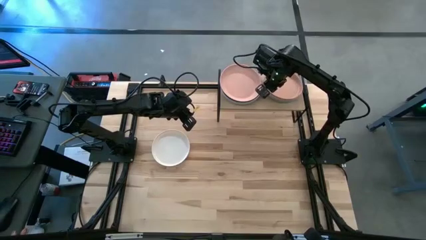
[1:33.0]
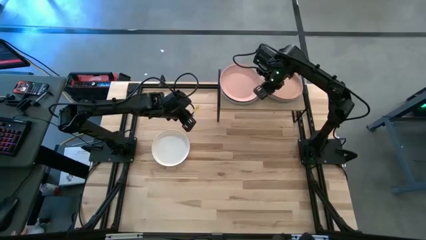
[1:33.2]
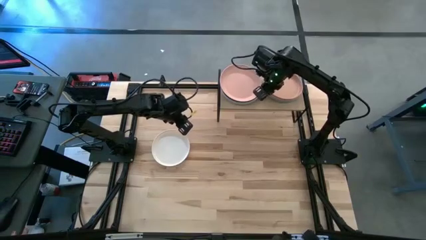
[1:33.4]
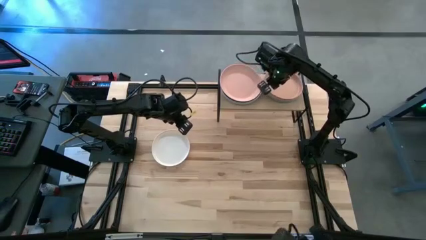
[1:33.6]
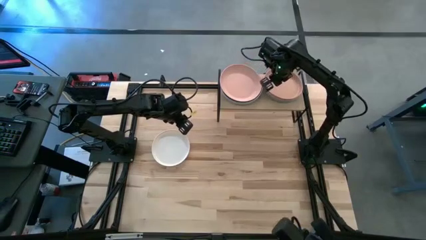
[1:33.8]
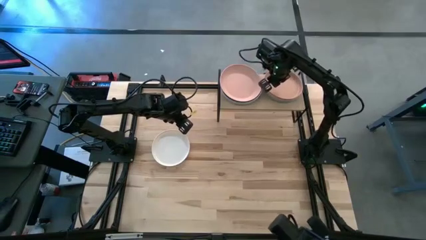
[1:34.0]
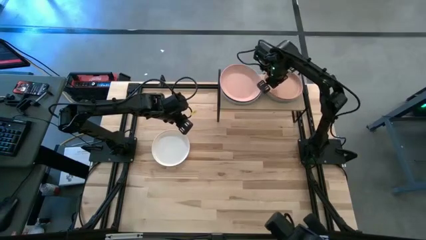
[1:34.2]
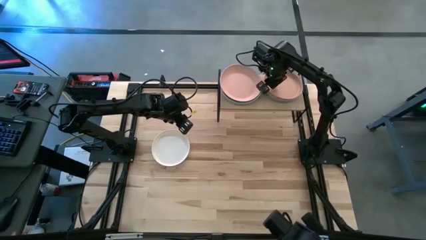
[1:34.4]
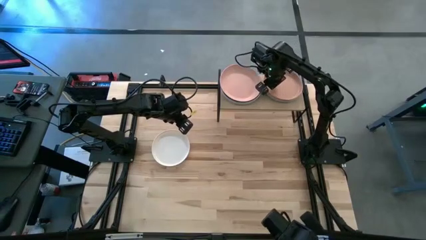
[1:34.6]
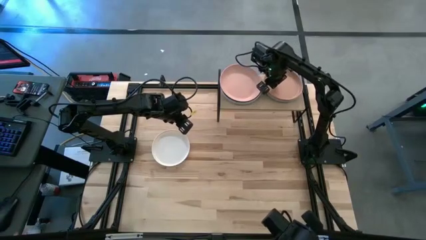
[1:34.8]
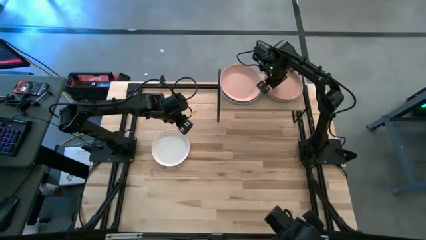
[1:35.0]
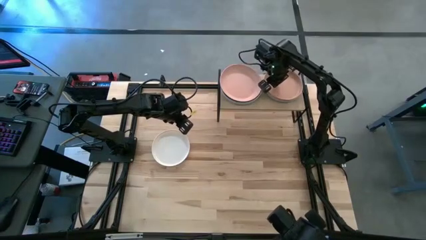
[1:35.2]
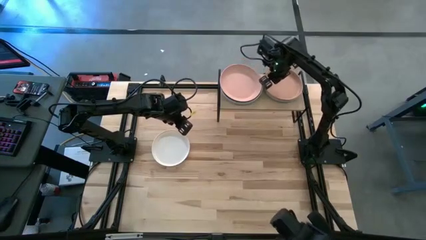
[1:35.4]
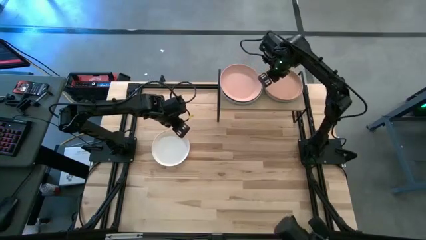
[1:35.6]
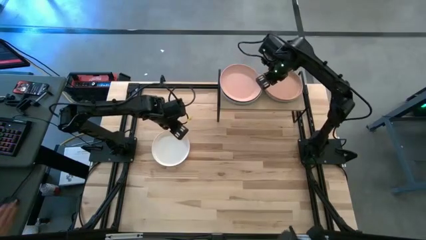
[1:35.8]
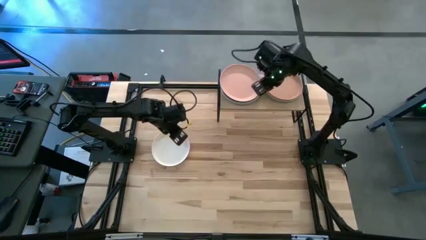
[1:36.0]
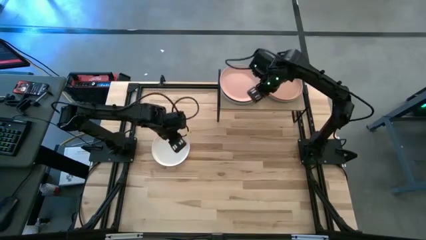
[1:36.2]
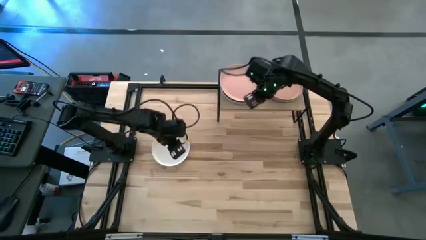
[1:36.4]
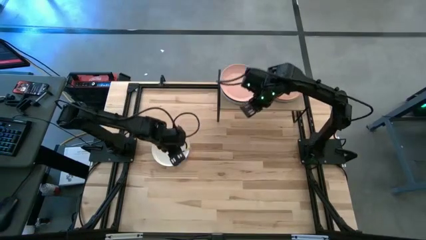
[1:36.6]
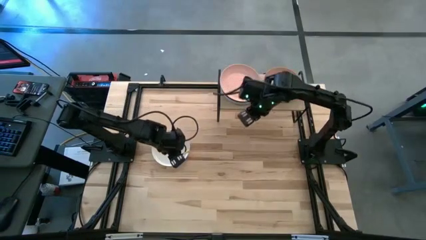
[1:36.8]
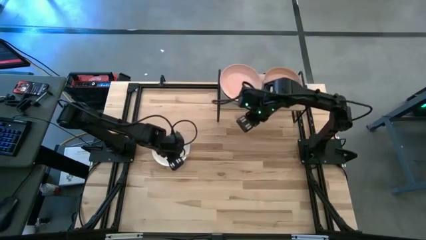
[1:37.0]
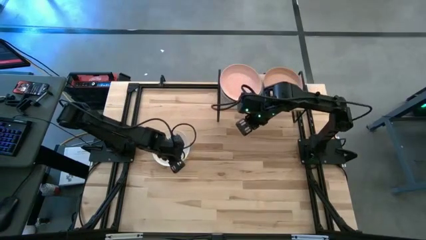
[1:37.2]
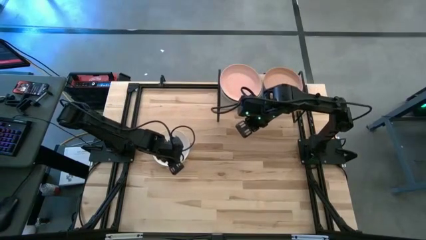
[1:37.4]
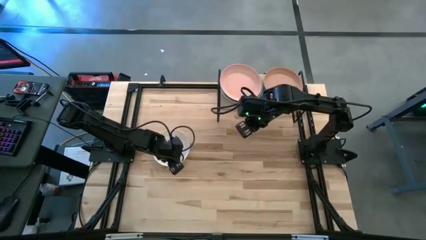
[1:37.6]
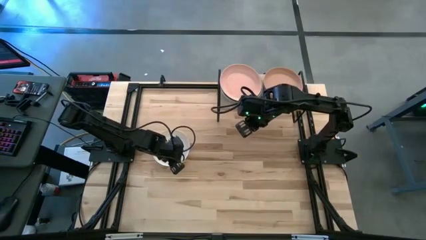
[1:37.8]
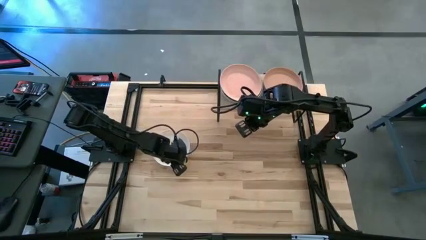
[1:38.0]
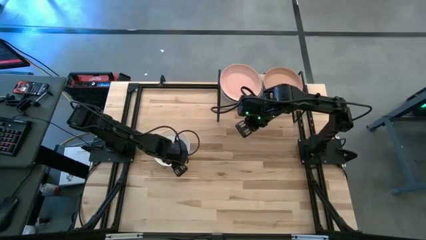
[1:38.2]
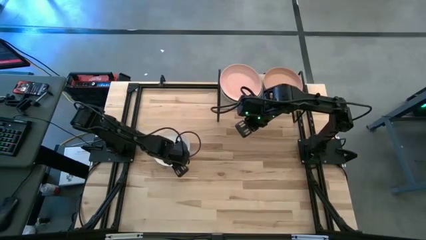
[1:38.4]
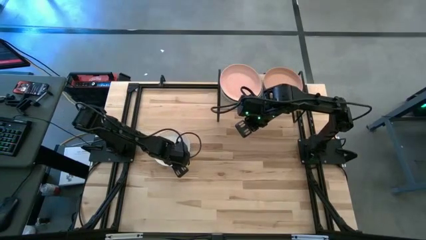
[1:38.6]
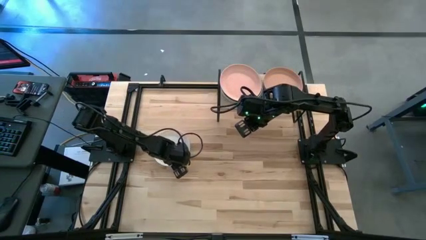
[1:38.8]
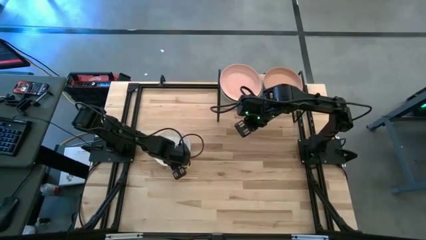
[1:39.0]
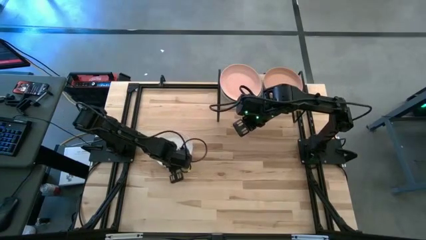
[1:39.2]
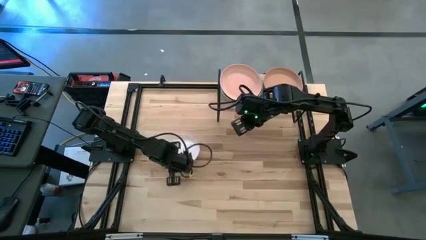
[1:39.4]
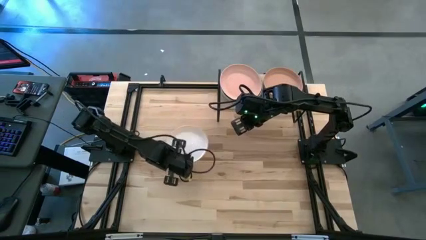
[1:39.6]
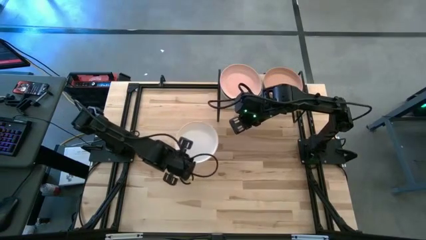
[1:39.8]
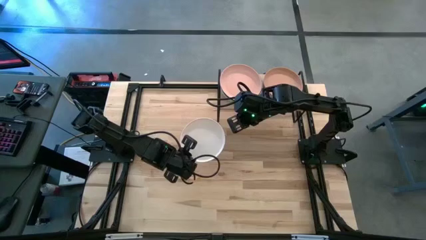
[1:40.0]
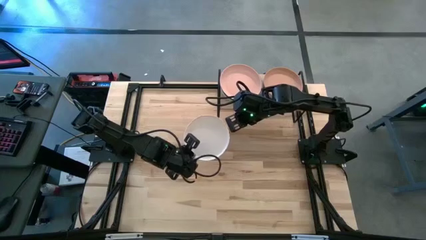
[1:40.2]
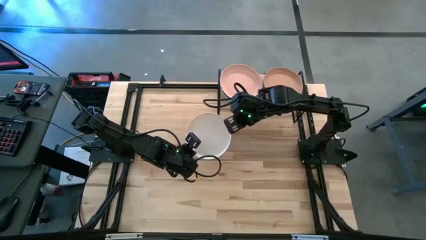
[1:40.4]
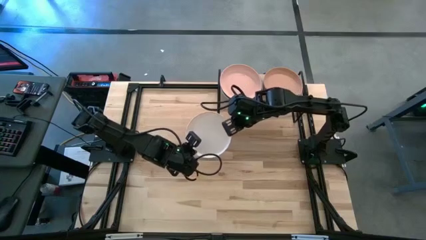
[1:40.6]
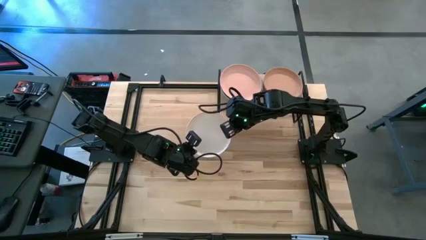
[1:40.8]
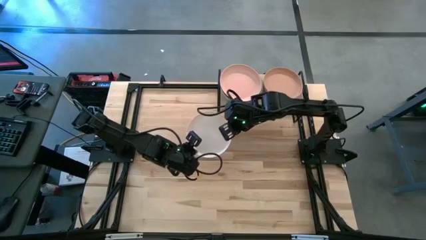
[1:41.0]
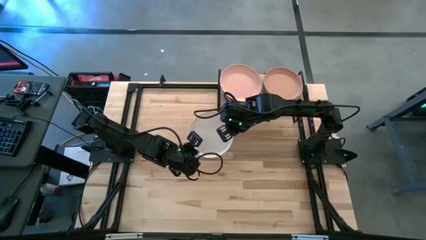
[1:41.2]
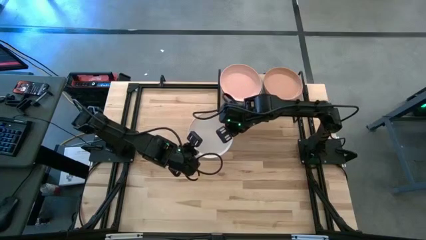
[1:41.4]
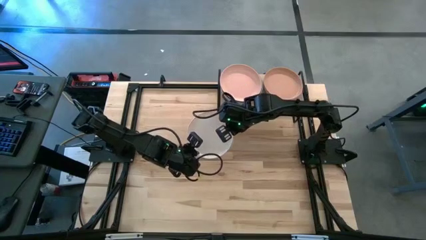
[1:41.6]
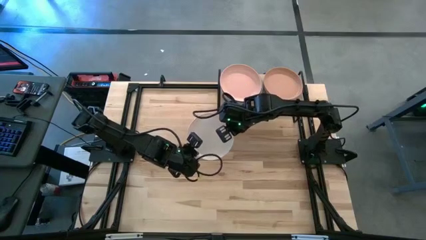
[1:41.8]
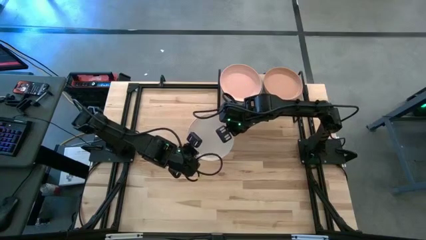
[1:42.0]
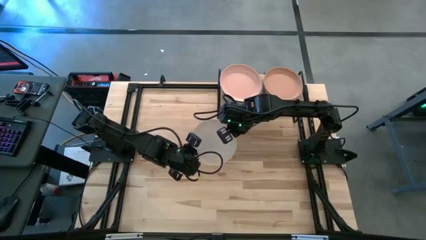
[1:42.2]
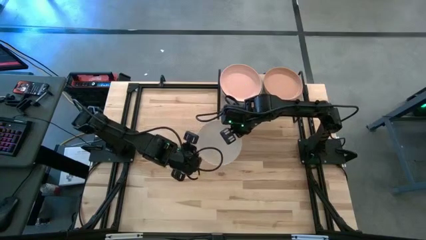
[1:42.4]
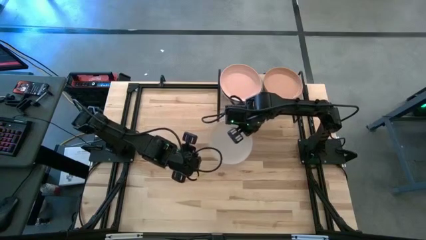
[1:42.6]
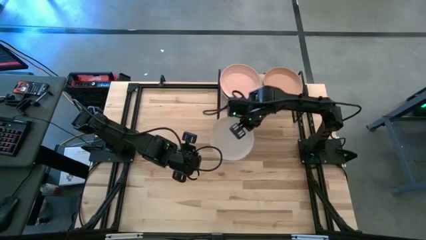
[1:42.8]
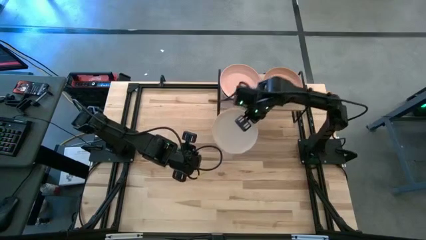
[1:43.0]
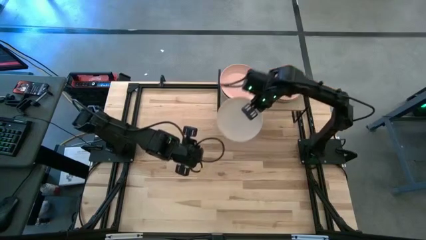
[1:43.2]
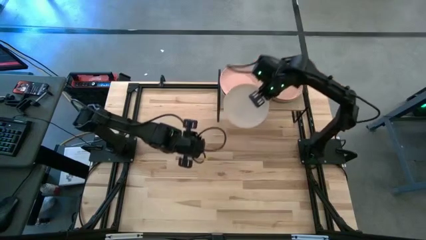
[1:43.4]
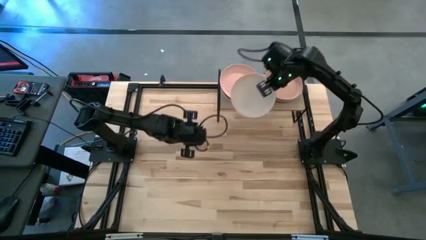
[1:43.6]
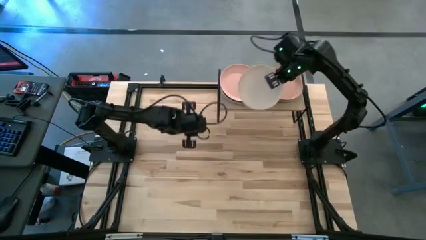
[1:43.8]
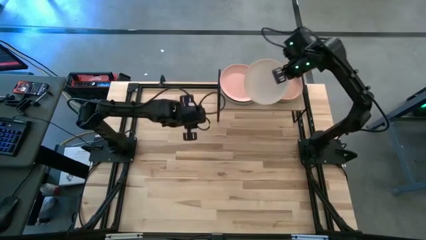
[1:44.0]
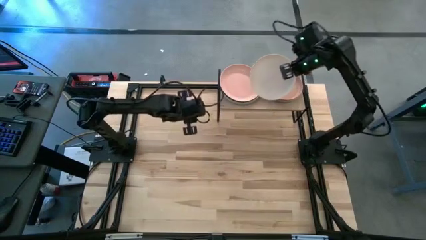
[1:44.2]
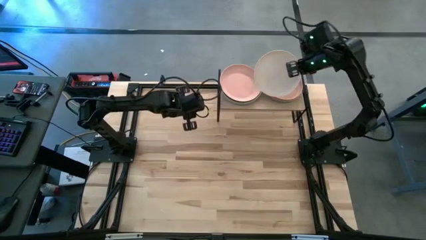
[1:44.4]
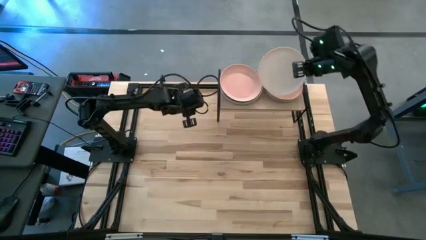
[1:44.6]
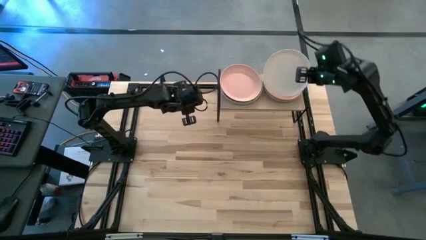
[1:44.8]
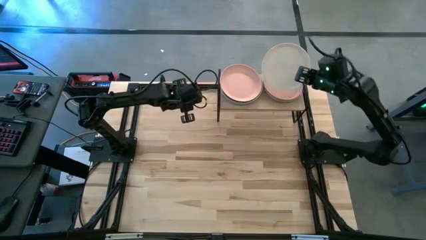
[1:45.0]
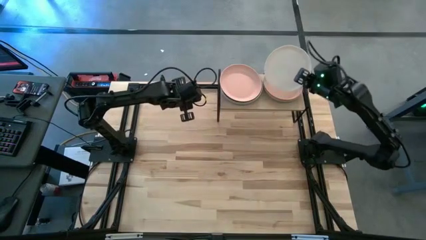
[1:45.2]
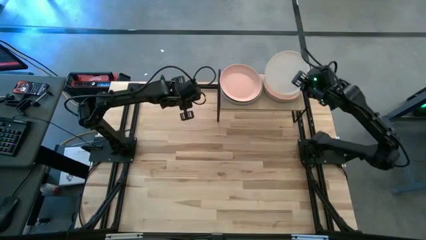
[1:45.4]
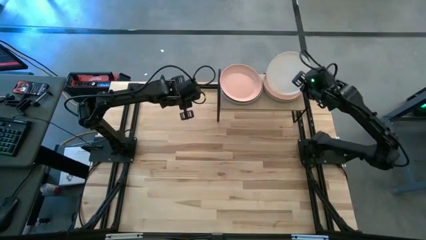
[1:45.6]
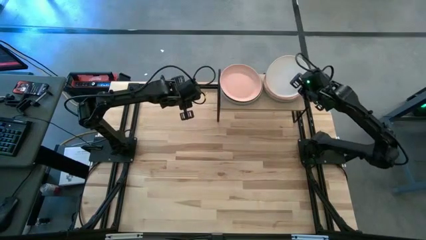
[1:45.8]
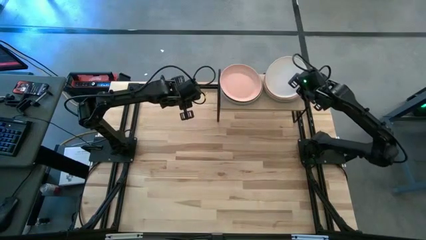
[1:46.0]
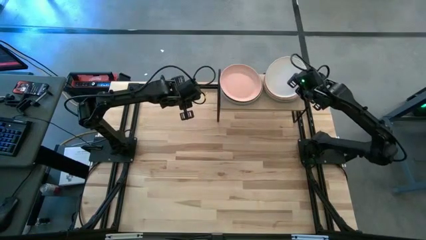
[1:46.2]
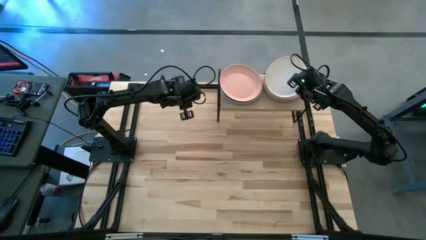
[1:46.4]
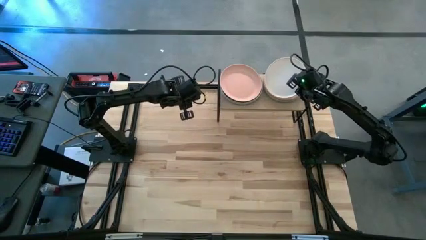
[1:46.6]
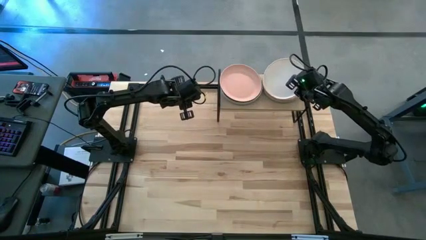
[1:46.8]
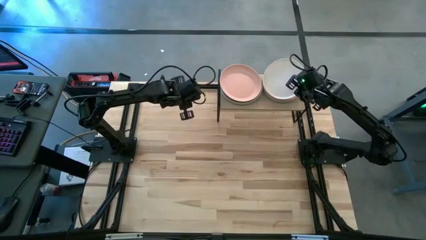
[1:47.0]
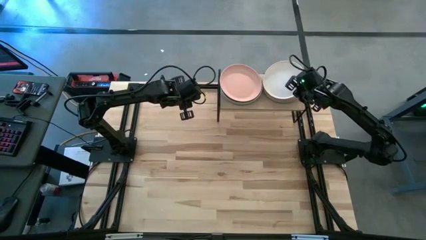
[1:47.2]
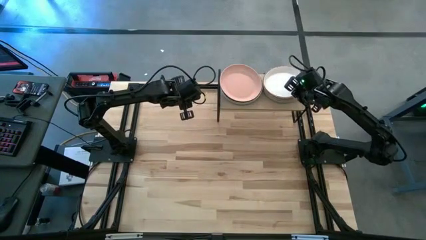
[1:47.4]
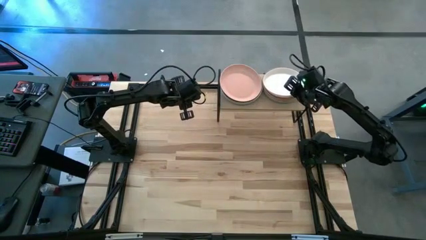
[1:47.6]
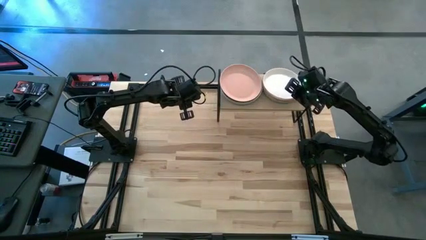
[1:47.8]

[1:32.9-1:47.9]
Task: Place and stack plates onto a shelf
Stack the white plate on top of the brown plate on the shelf

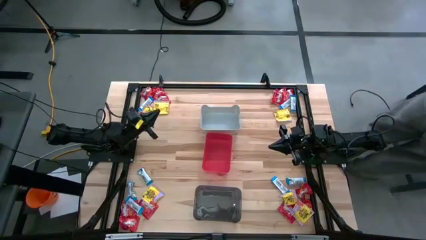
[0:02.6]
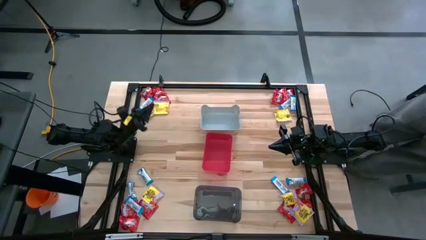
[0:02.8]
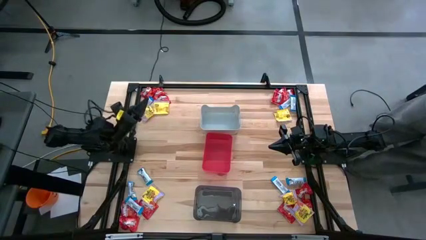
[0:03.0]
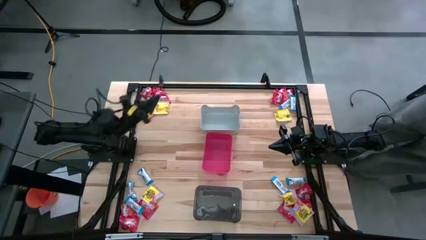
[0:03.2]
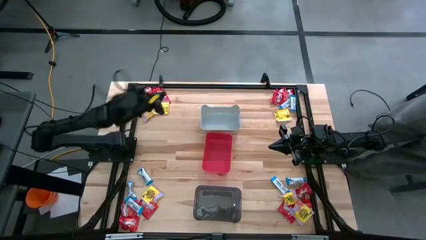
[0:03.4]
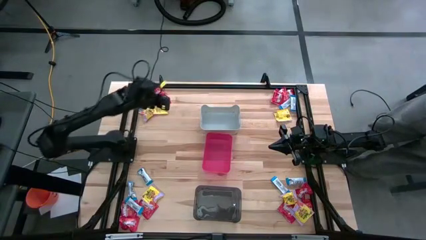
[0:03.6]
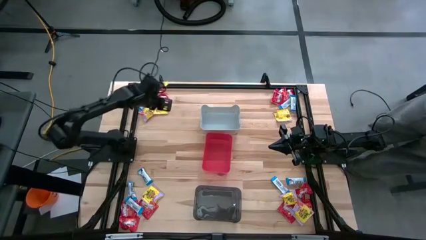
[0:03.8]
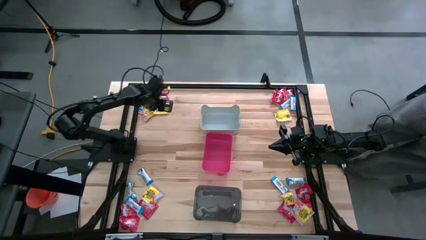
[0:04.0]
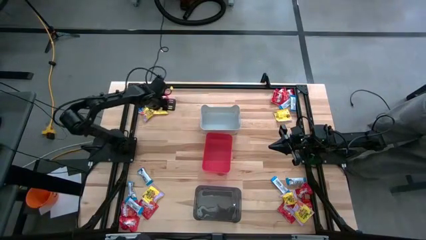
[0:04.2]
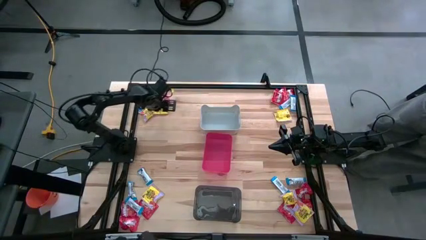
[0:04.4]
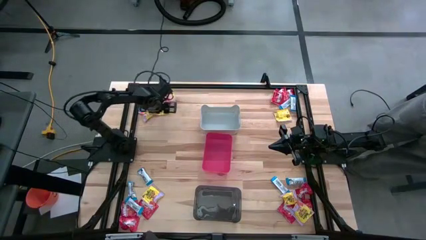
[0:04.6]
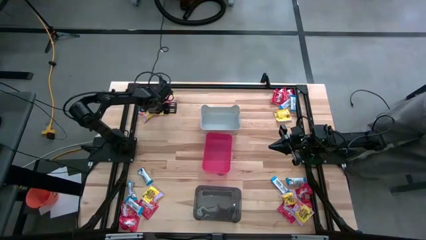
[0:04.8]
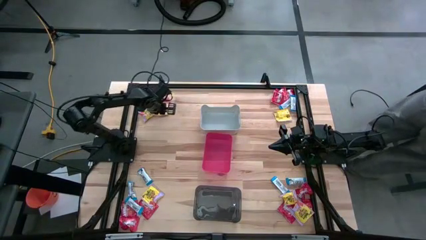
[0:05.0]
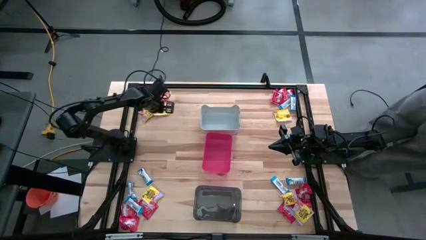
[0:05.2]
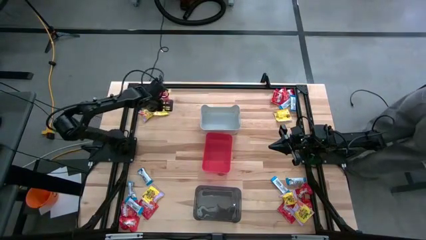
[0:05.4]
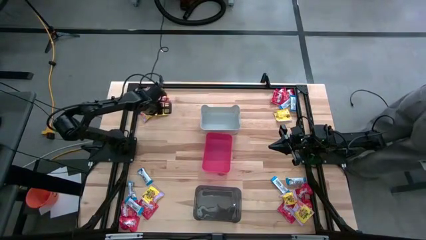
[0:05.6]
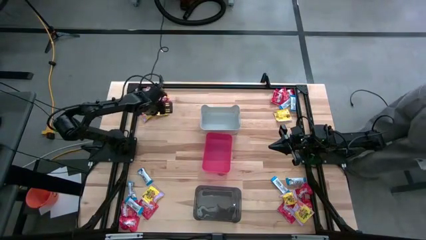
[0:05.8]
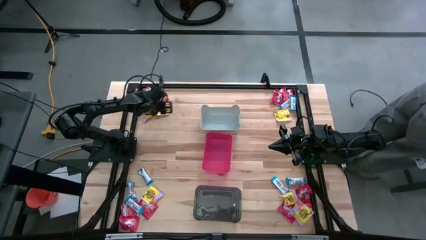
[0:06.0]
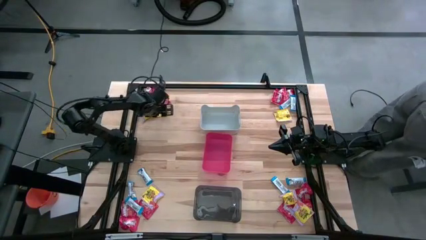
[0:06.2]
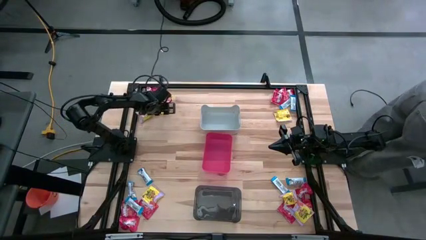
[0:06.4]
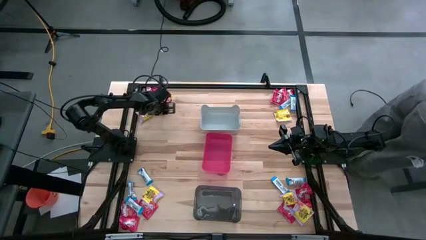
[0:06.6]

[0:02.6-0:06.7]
Task: Sort candy
Put the yellow candy into the red bin
